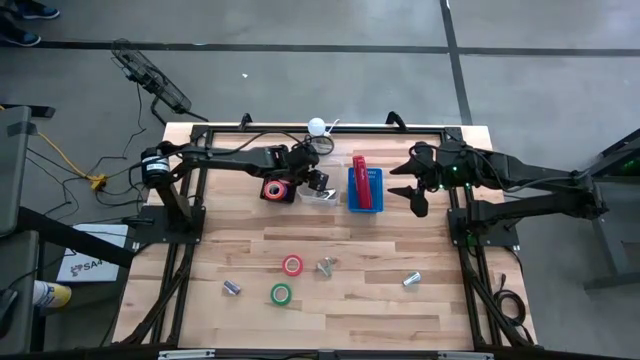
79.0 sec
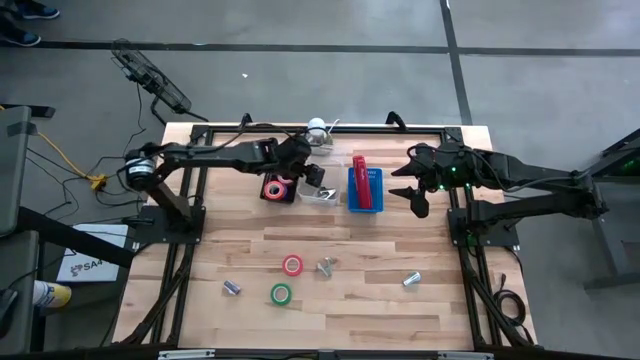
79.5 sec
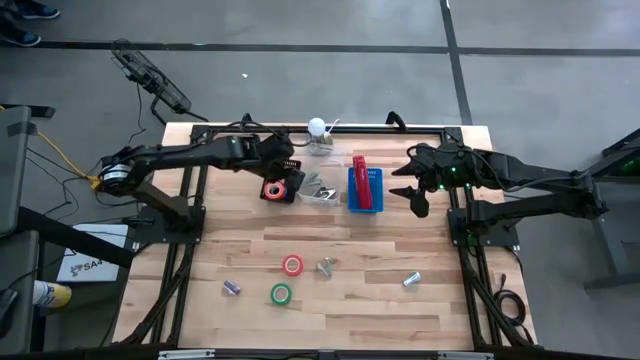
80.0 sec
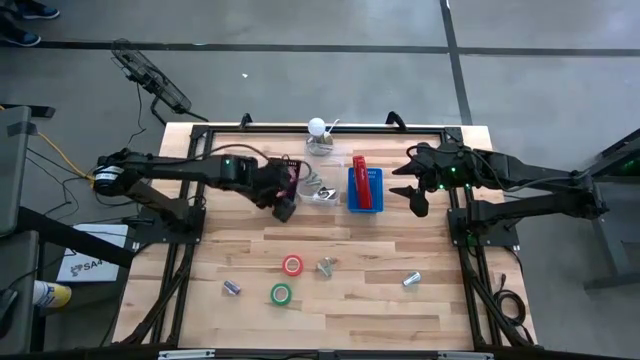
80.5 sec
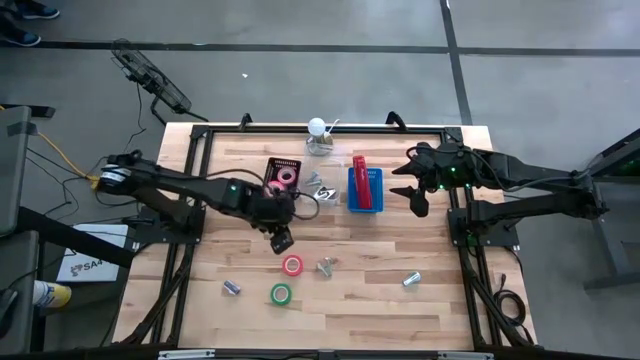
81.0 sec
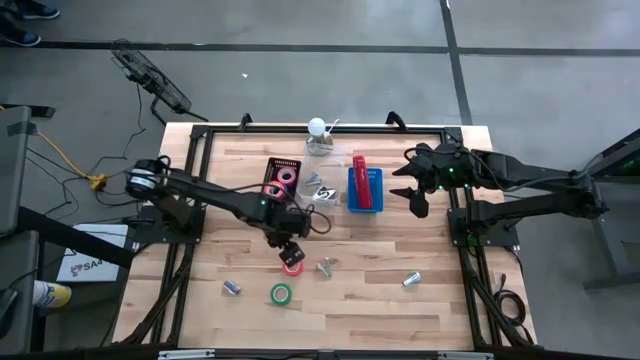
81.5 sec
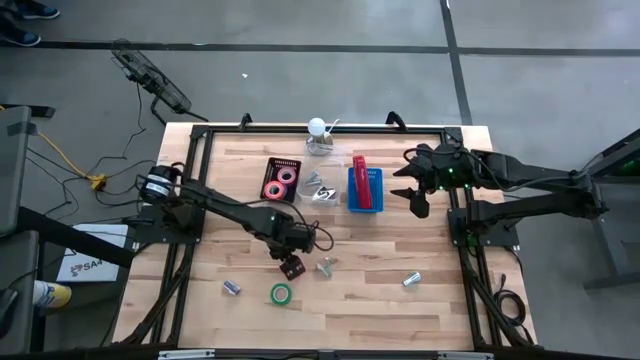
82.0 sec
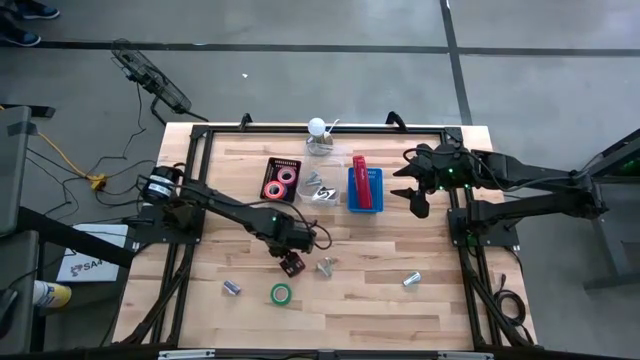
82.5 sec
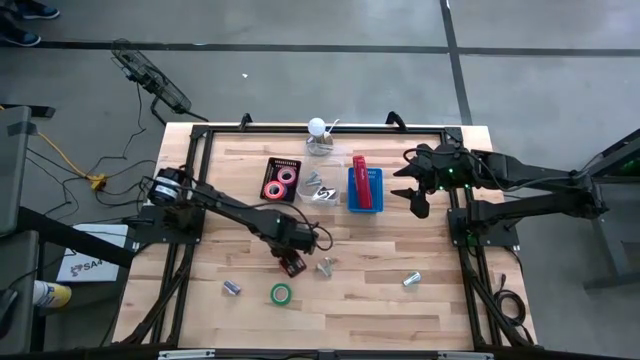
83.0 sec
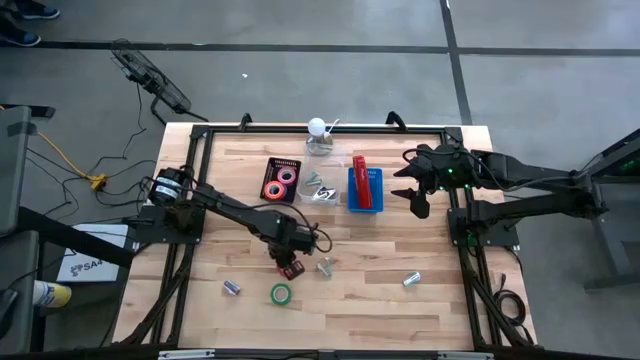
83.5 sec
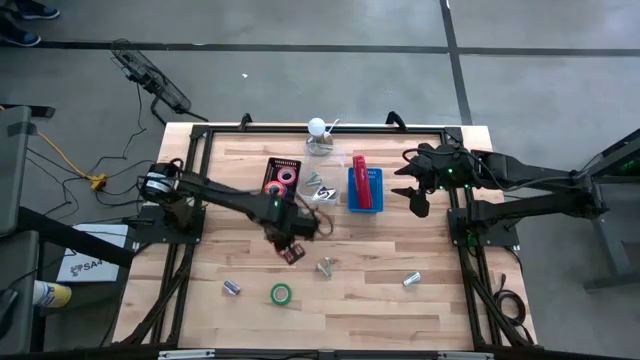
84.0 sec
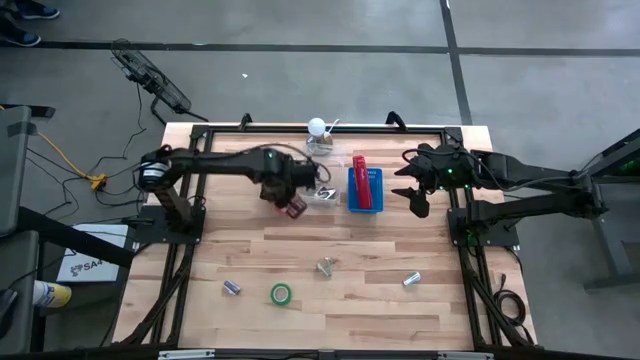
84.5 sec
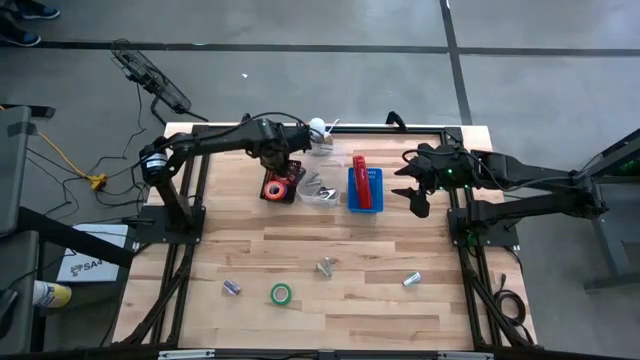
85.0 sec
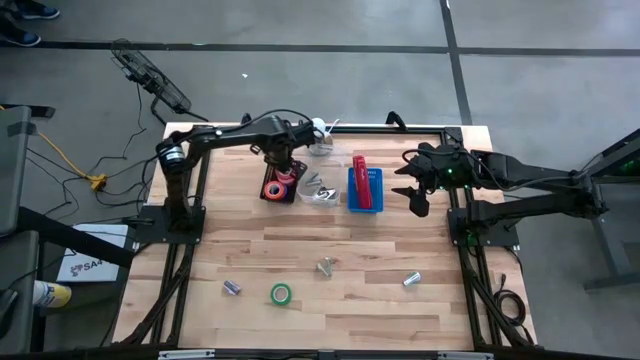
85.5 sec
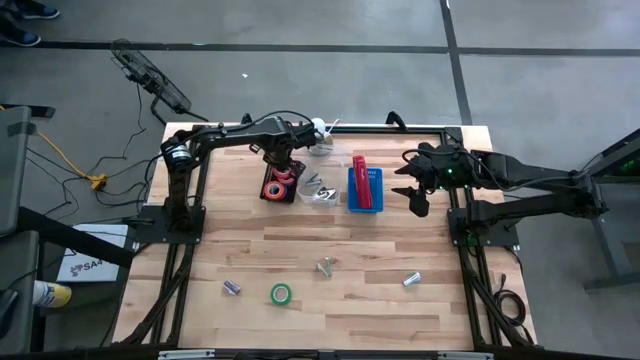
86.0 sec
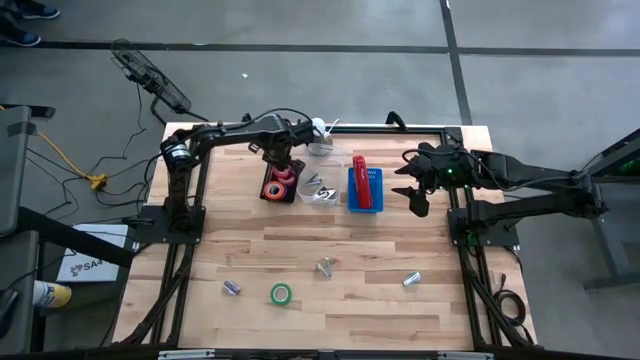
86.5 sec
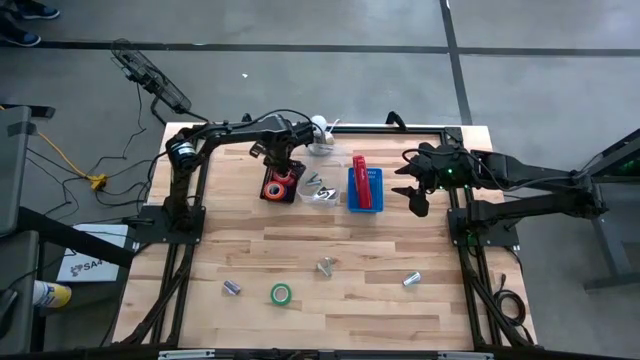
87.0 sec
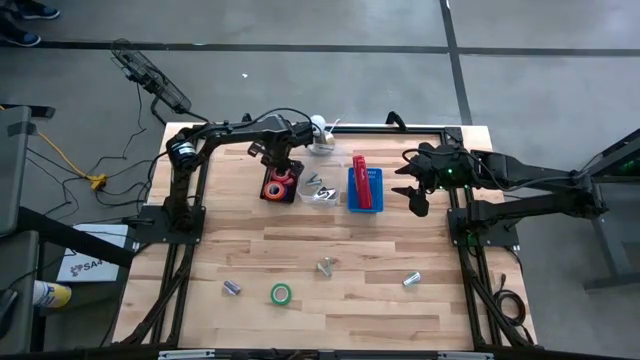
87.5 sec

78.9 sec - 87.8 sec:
Task: Pick and place Stapler, Stapler remover, tape
Put the dark orange tape into the black basket

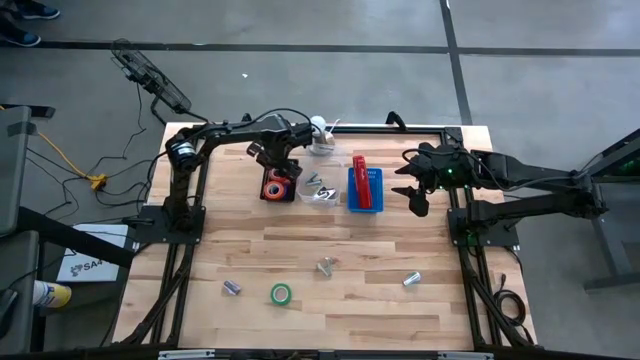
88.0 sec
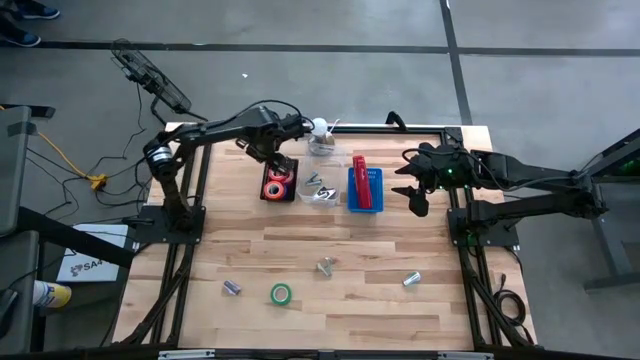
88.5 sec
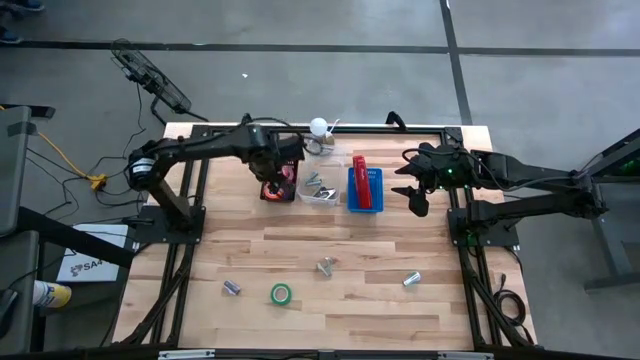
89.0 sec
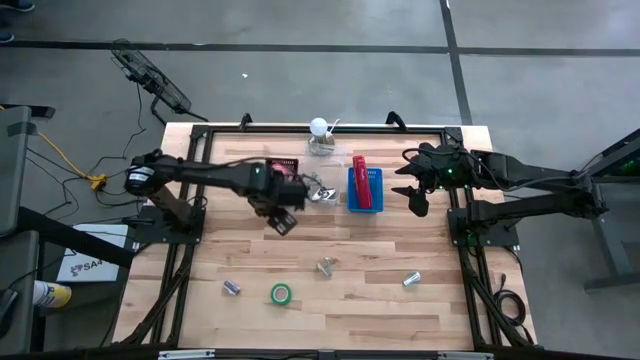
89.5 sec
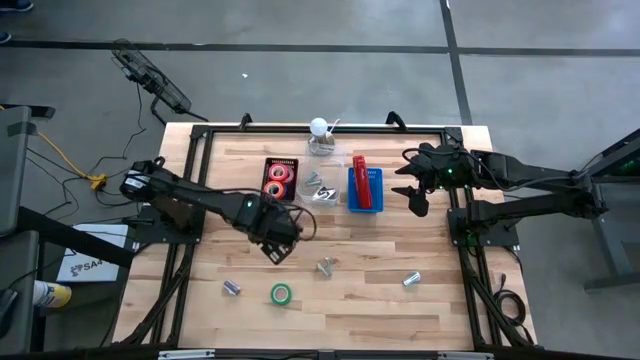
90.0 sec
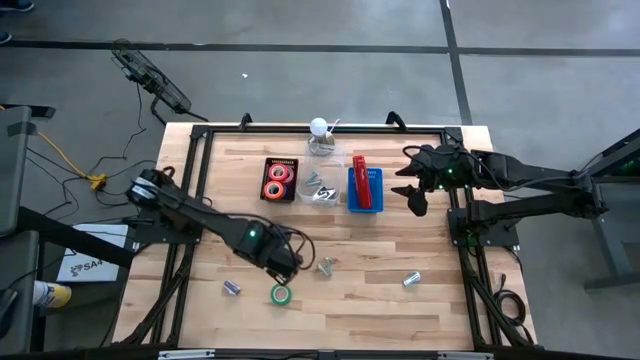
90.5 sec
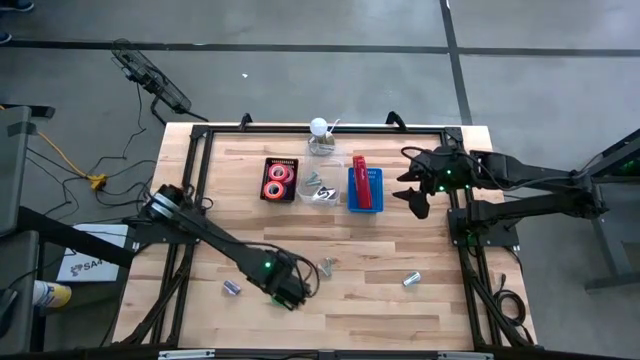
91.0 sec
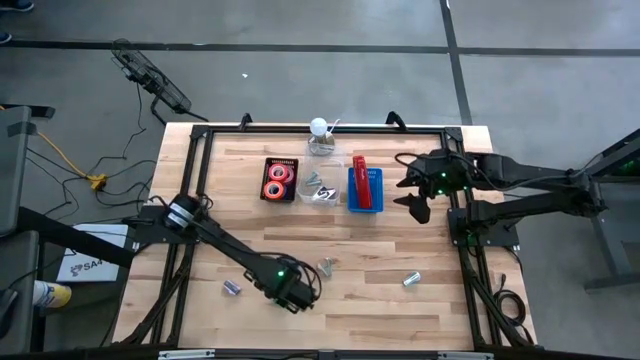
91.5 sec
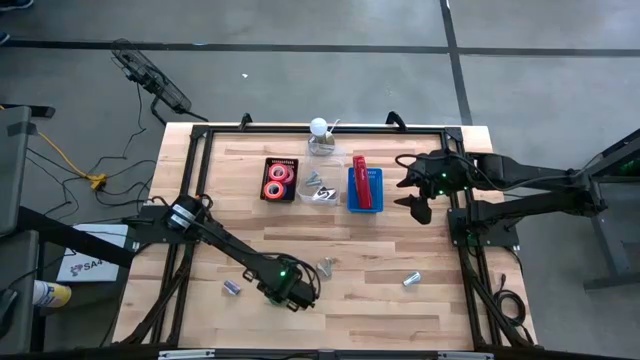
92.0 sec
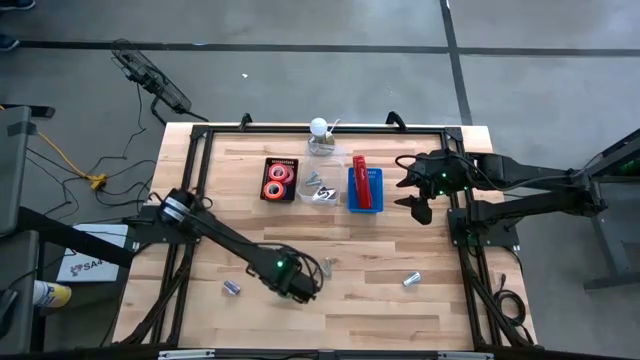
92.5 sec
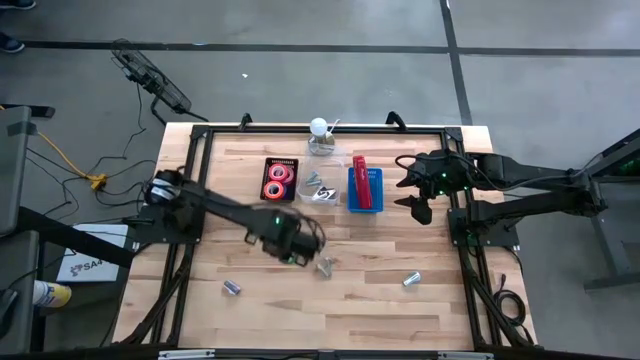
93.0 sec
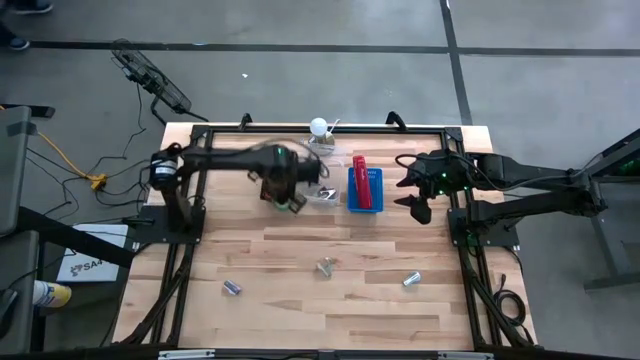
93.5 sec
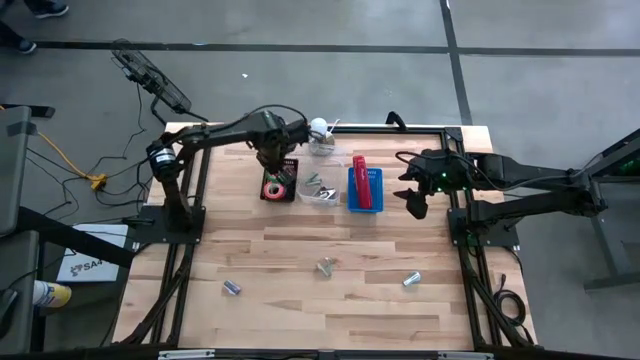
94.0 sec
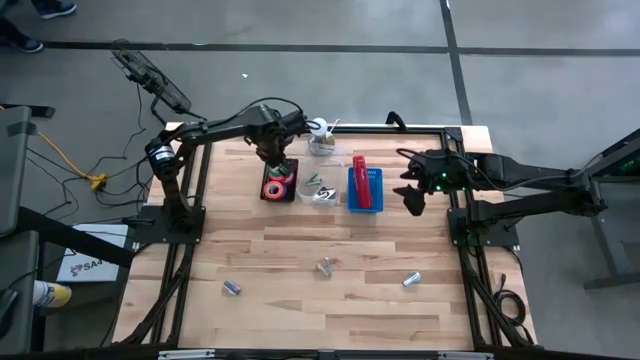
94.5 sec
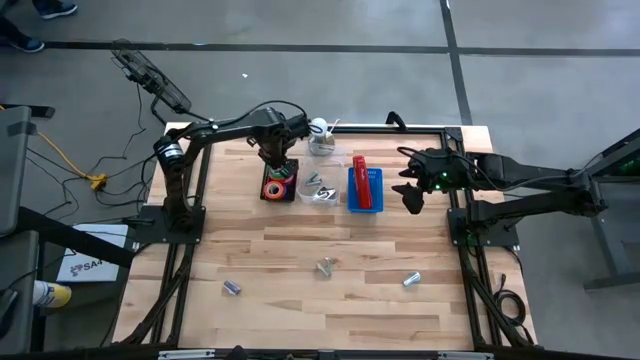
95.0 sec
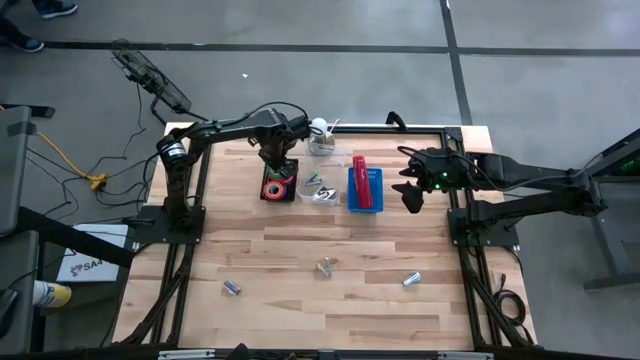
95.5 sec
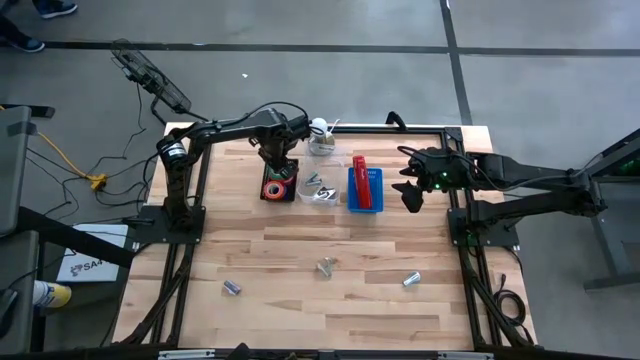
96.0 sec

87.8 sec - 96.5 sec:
Put the green tape into the black basket

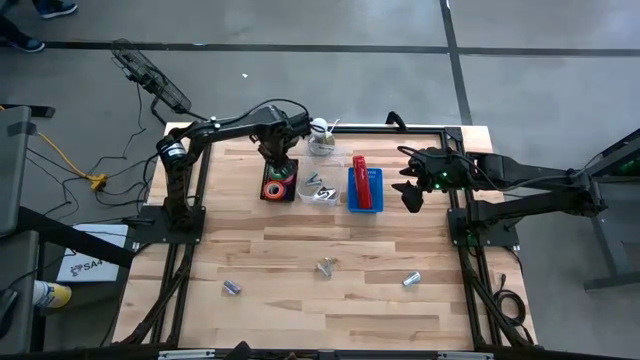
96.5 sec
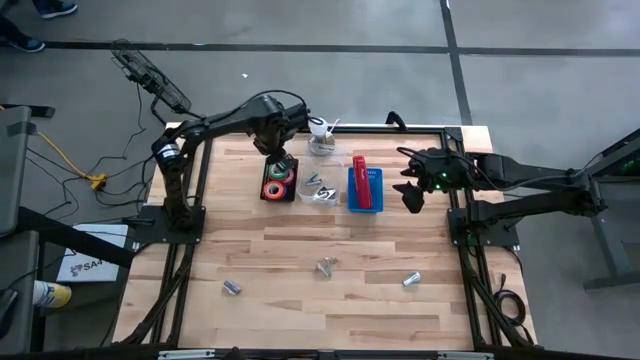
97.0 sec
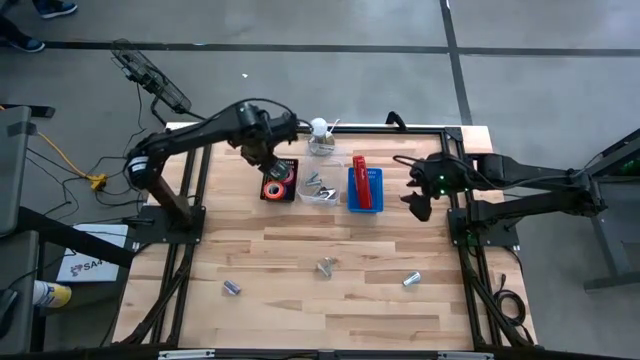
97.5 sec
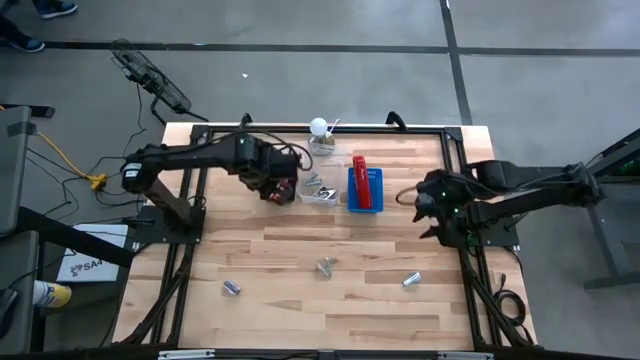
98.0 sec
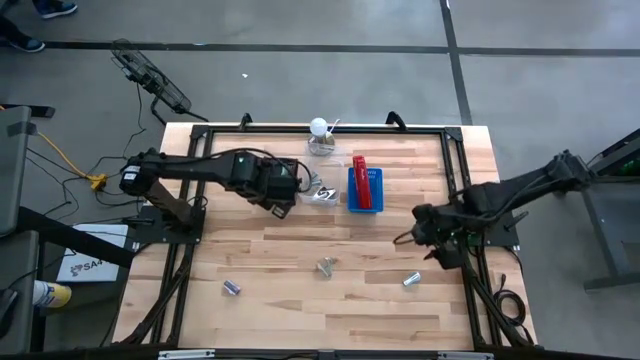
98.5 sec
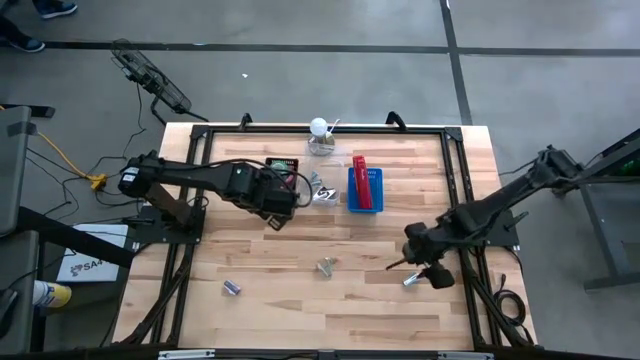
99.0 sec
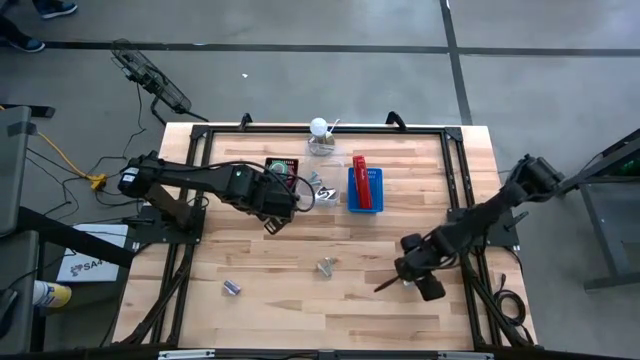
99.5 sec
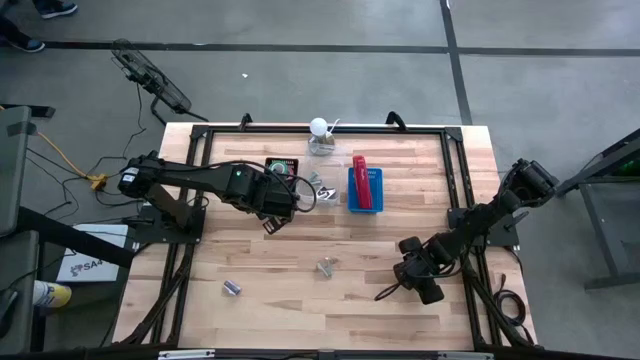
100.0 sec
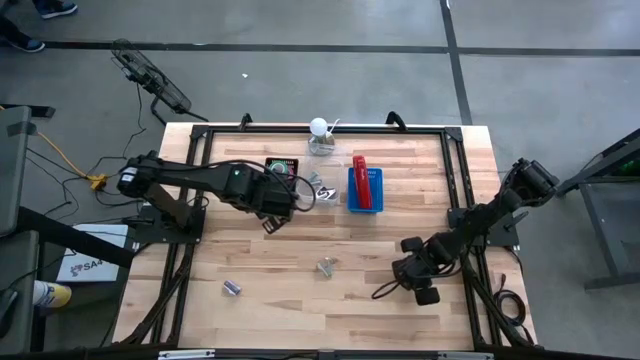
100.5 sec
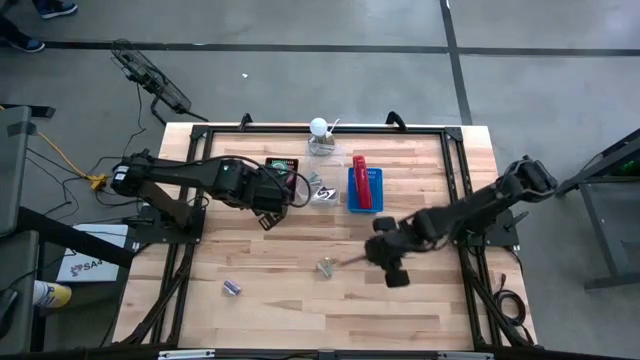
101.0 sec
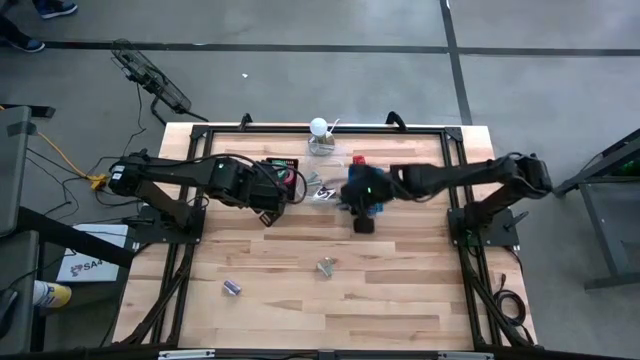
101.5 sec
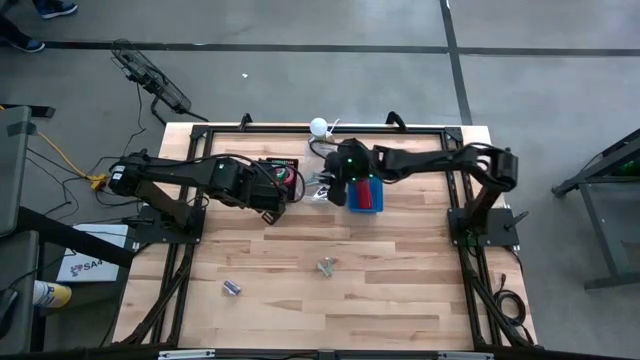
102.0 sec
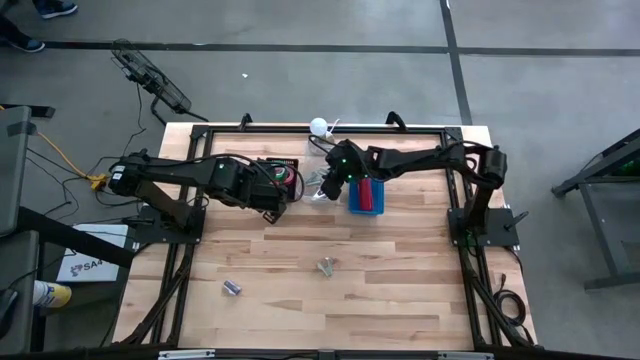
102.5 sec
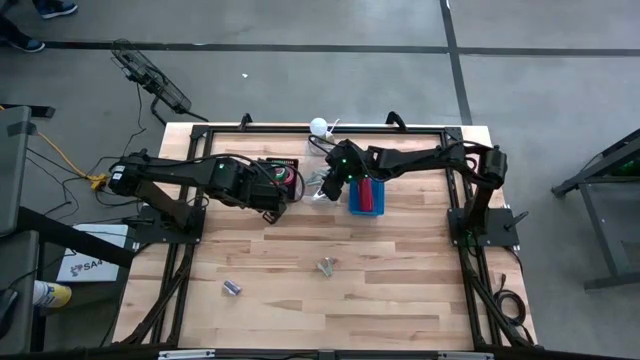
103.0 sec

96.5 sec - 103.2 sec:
Put the blue staple remover into the transparent bin
